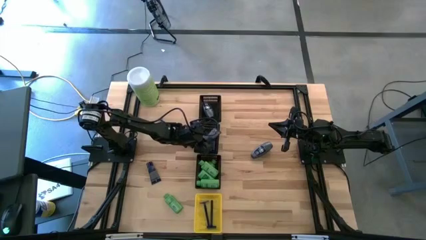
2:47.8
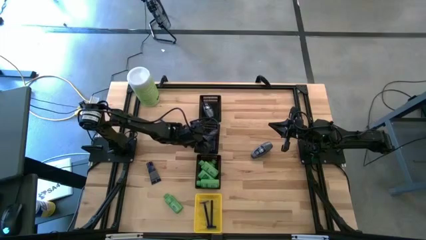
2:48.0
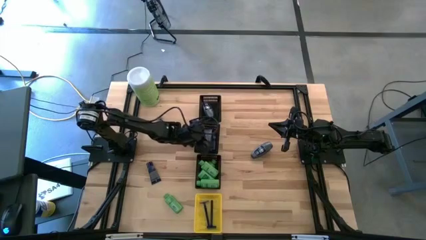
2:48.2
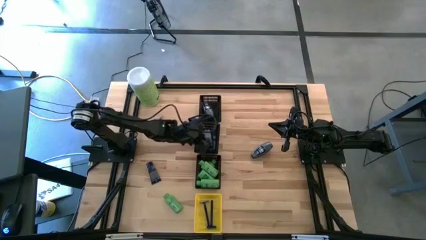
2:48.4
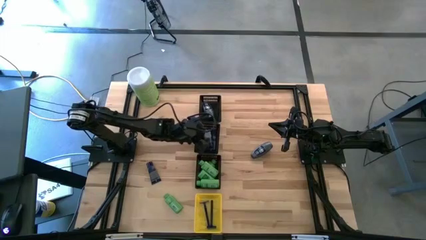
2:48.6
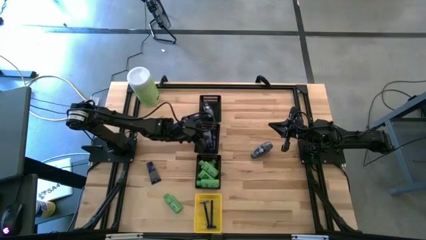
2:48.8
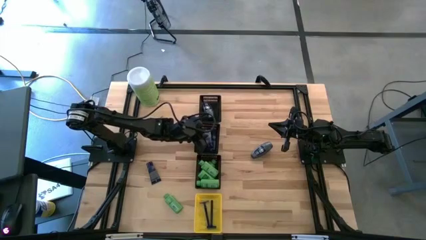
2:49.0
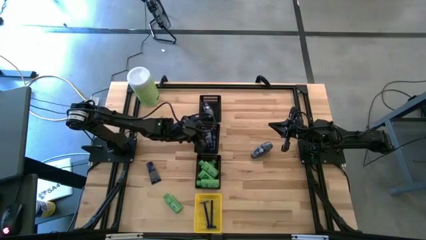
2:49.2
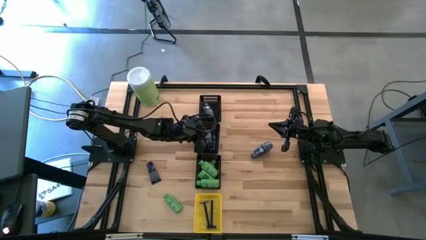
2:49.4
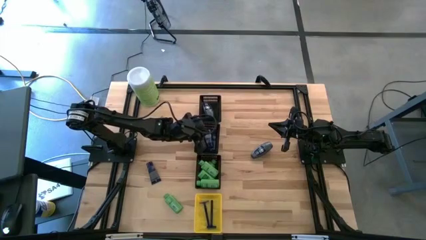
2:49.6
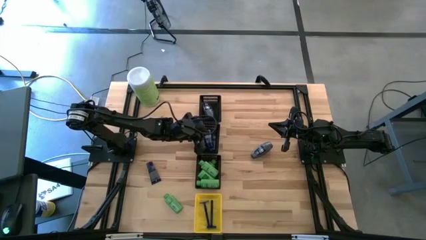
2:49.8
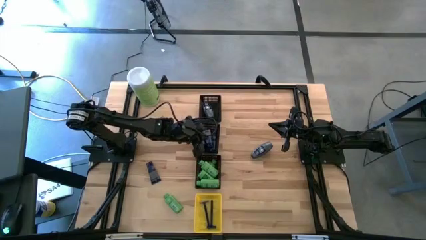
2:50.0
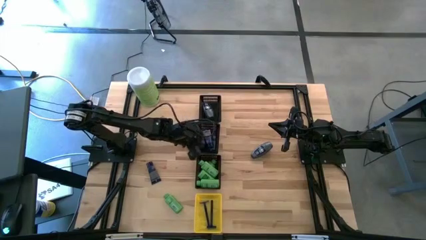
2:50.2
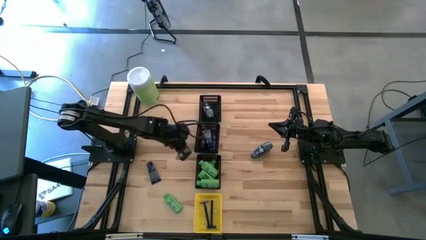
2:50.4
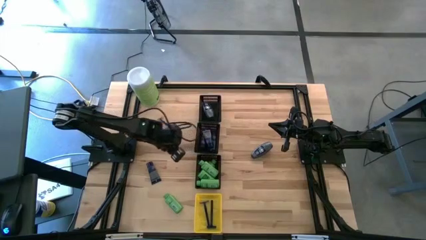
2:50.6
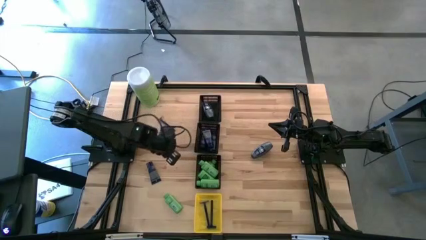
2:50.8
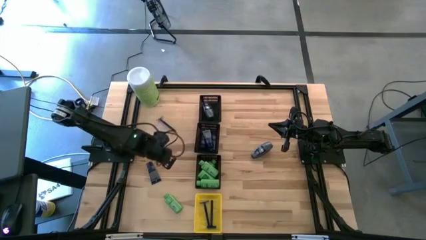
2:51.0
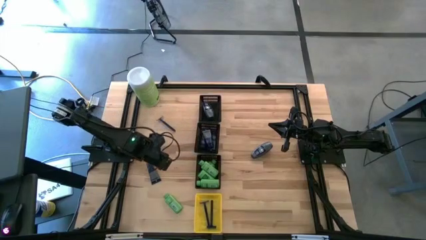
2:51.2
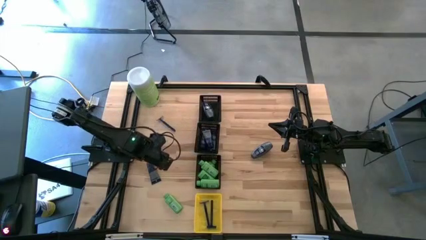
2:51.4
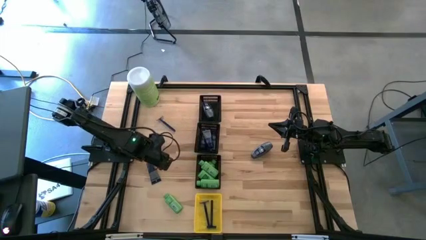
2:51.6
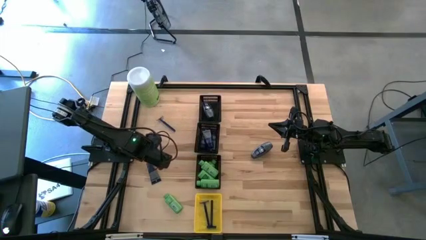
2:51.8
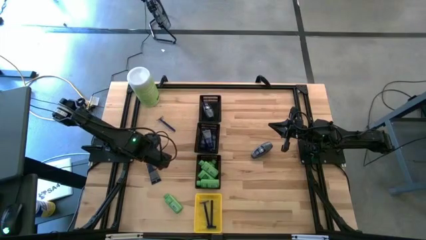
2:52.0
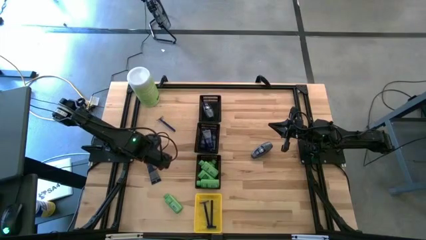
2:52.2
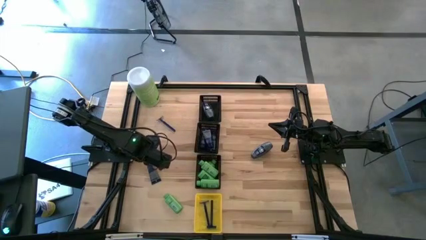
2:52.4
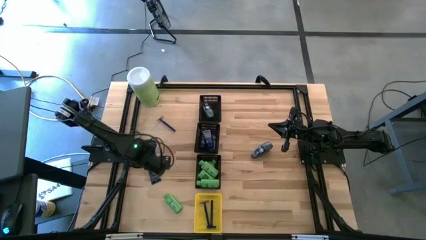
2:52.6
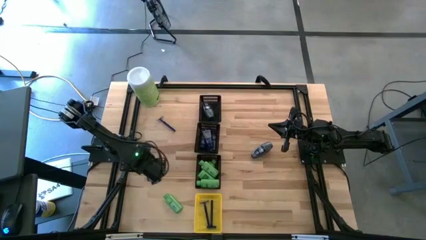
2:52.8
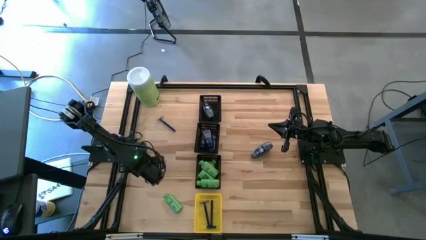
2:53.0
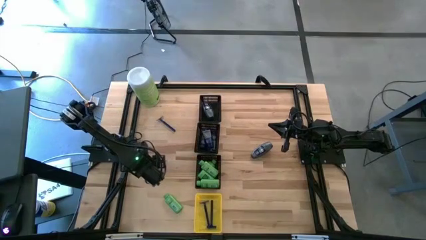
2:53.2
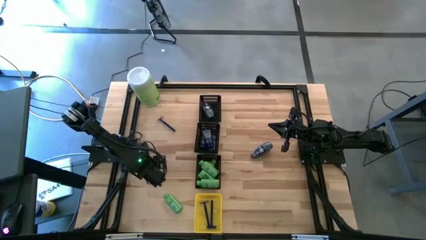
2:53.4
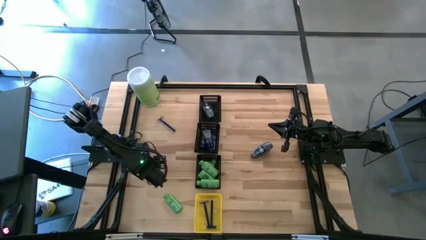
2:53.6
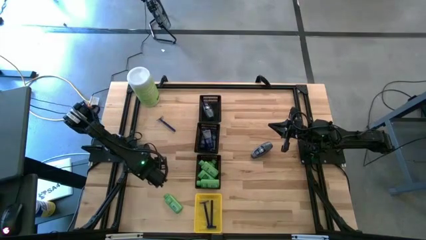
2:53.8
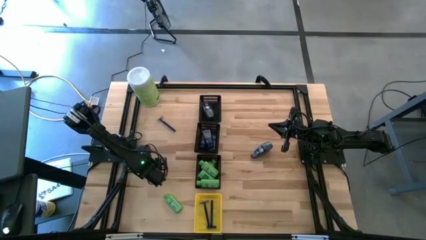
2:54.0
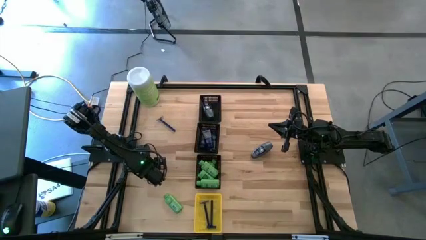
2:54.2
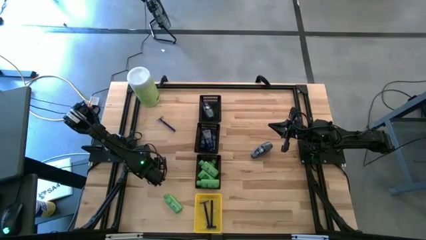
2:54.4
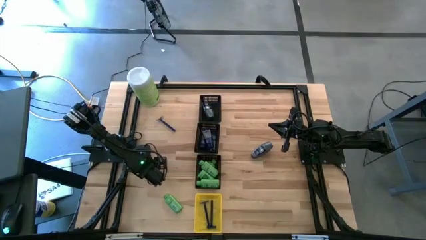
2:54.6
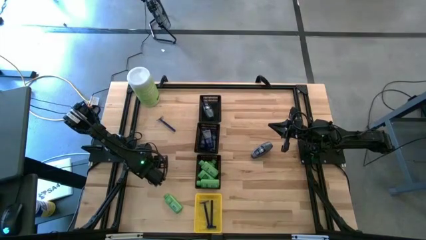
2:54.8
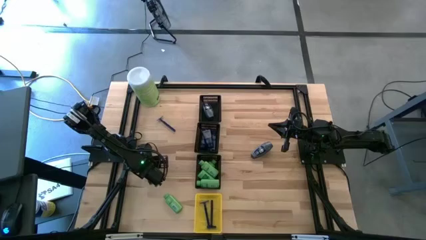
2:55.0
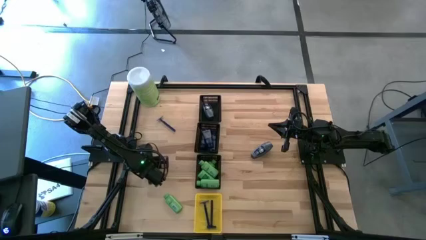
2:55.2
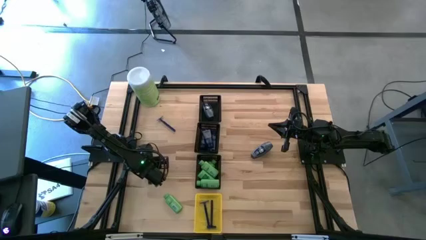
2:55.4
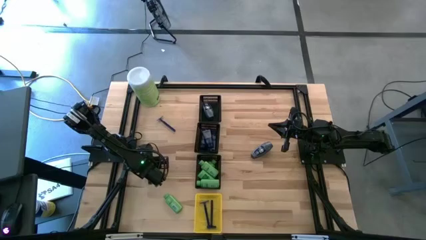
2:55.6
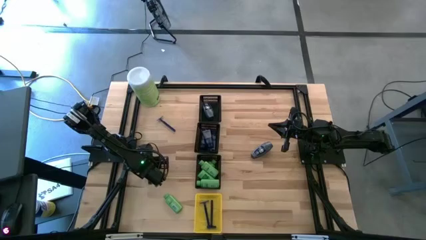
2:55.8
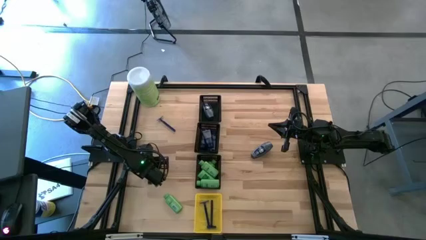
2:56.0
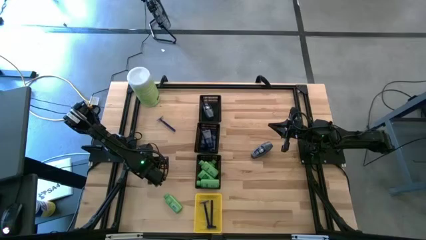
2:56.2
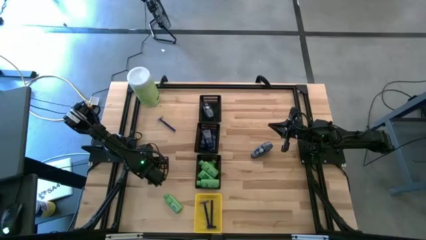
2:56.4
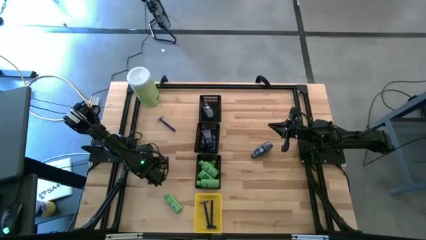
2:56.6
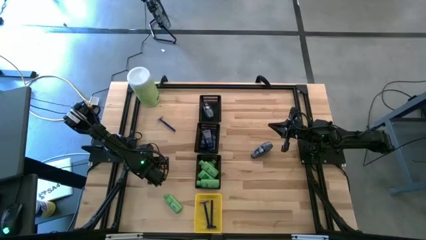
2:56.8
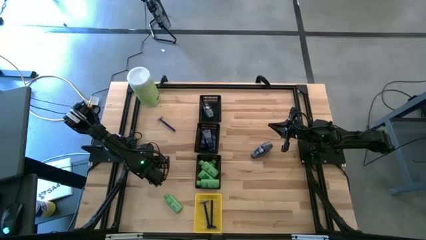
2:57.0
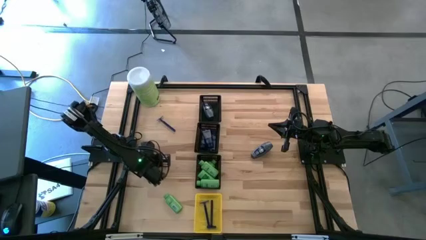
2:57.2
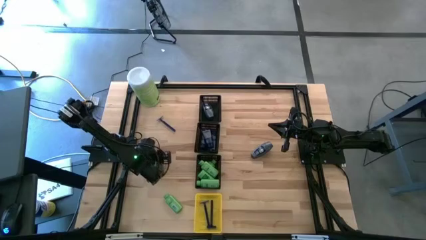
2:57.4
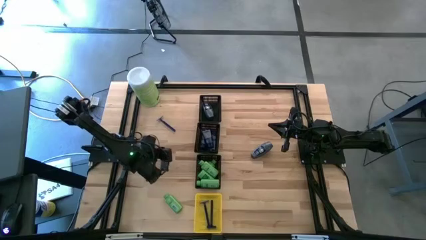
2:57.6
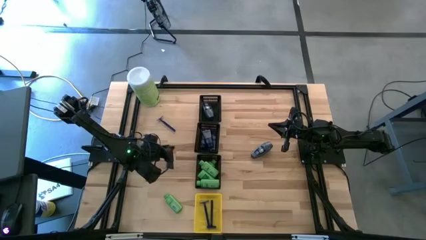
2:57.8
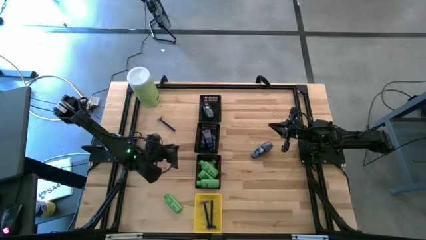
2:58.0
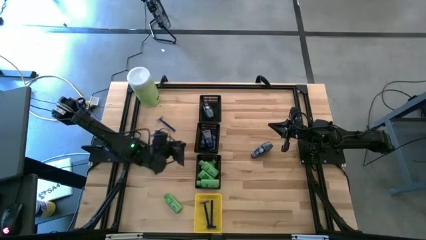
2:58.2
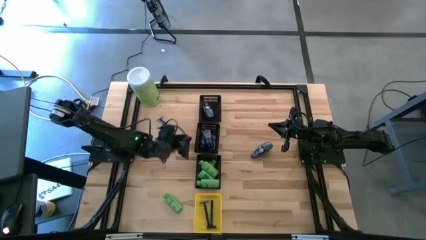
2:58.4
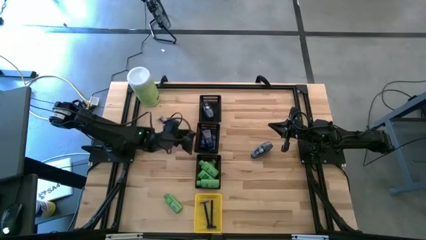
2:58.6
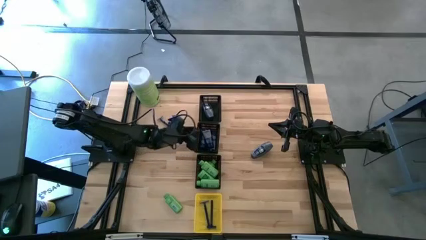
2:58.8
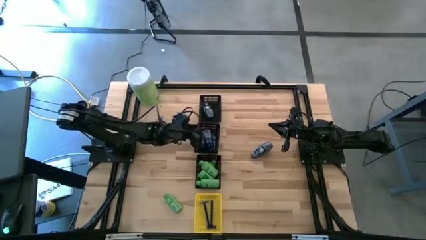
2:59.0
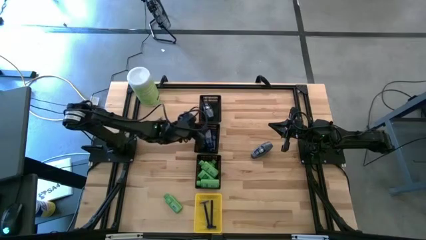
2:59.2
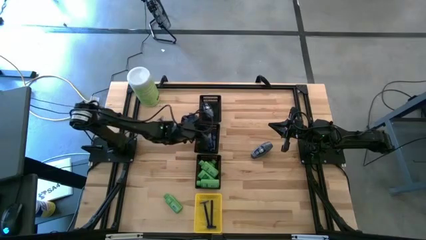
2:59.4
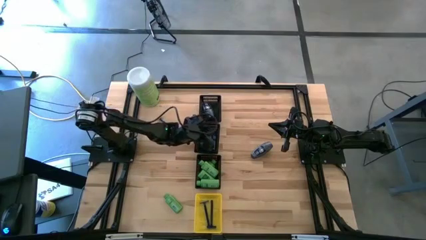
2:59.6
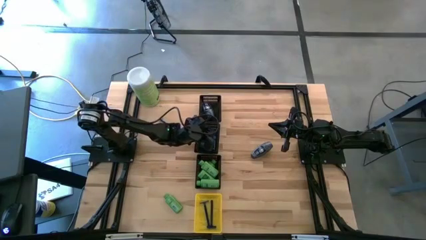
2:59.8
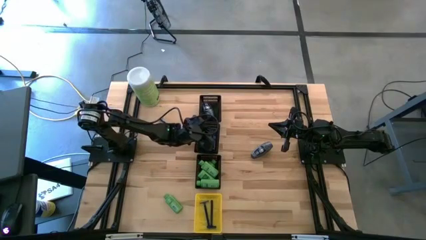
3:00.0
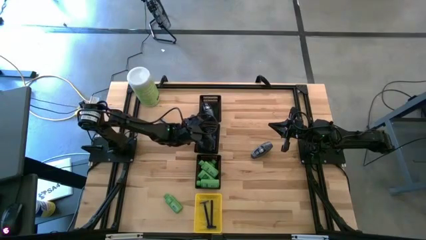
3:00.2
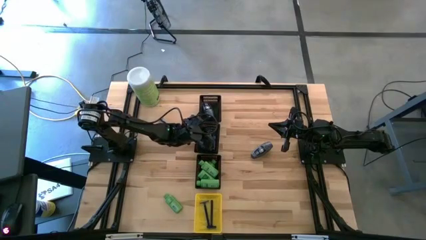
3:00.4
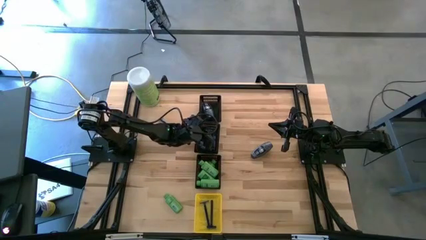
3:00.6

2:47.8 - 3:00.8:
Task: Pick & Place Travel size toiletries
Put the dark blue shave butter bottle into the center black bin

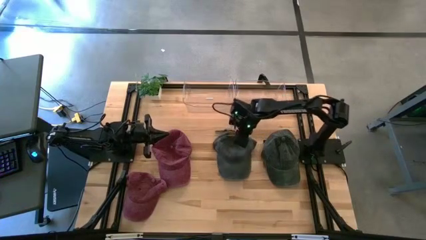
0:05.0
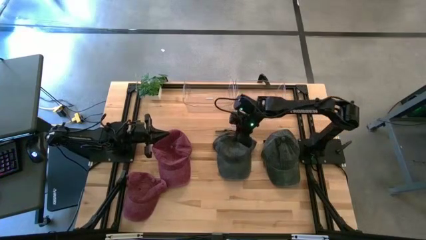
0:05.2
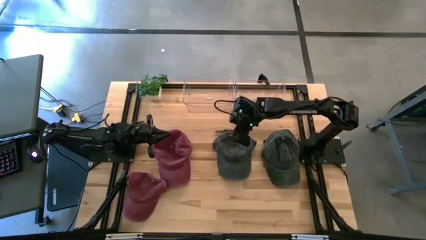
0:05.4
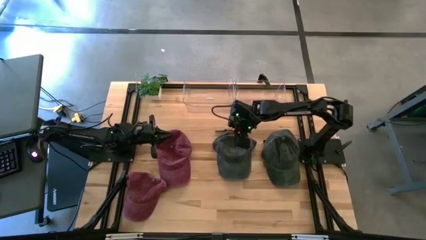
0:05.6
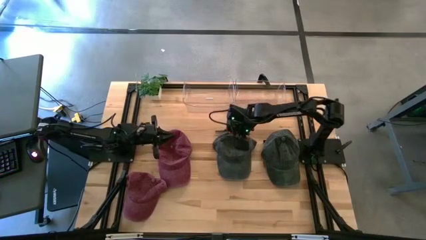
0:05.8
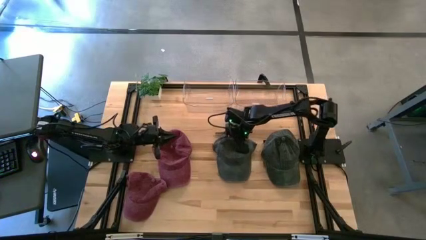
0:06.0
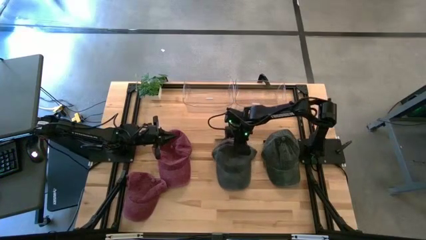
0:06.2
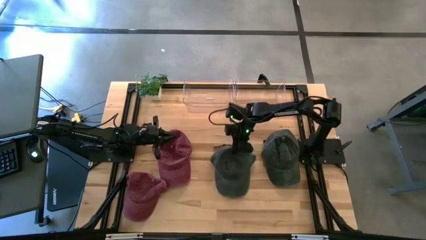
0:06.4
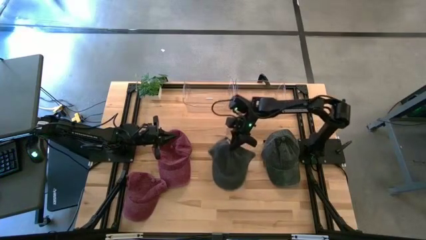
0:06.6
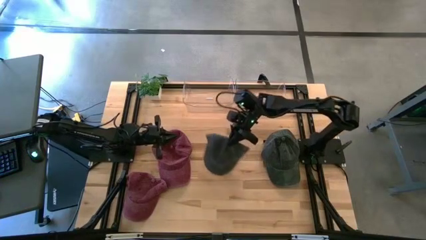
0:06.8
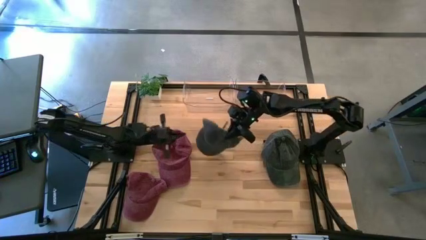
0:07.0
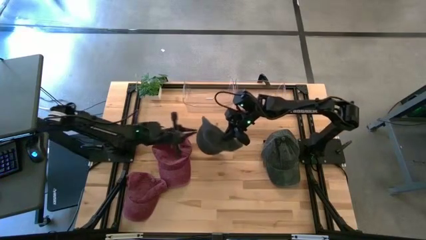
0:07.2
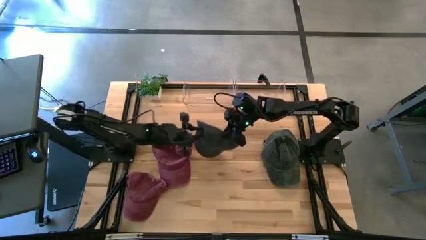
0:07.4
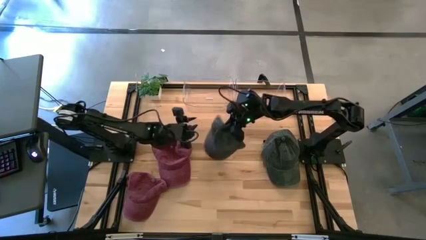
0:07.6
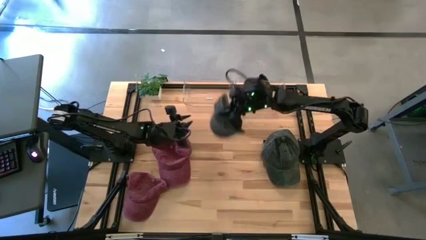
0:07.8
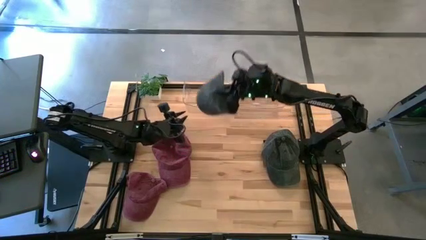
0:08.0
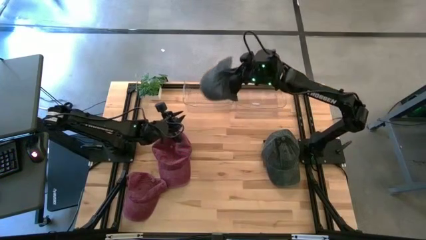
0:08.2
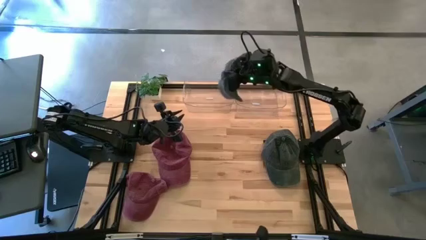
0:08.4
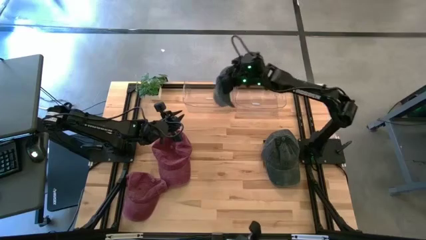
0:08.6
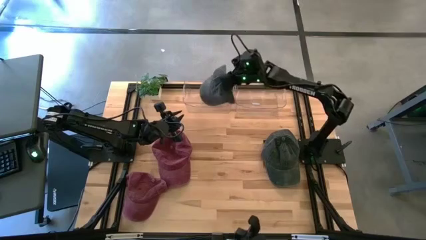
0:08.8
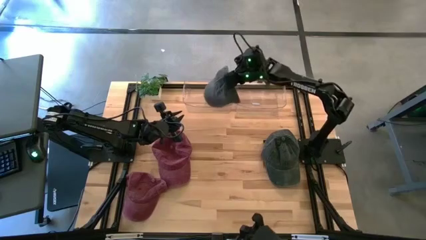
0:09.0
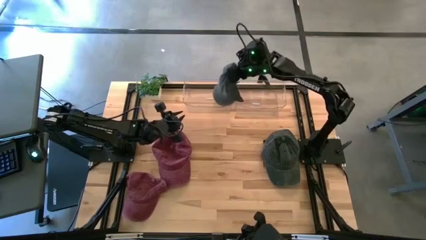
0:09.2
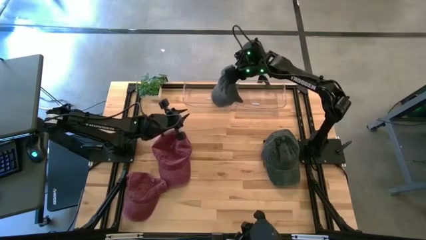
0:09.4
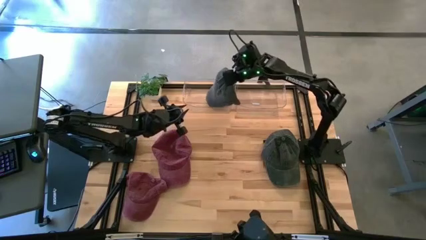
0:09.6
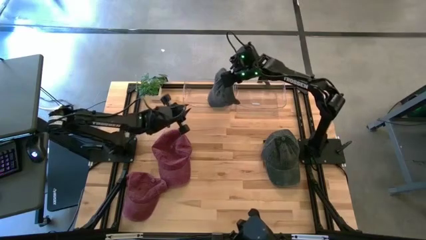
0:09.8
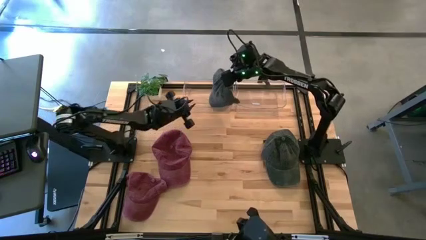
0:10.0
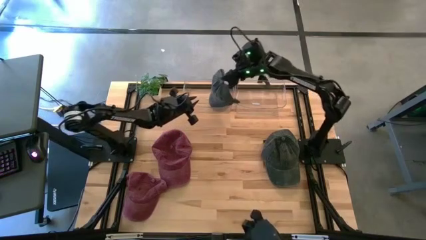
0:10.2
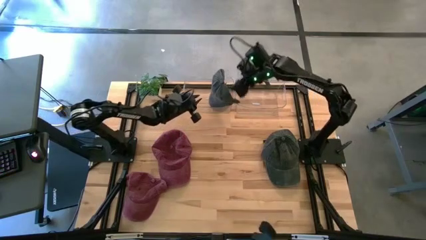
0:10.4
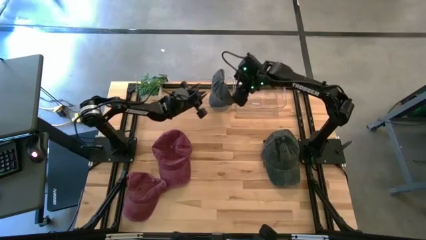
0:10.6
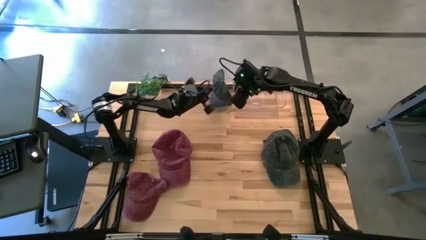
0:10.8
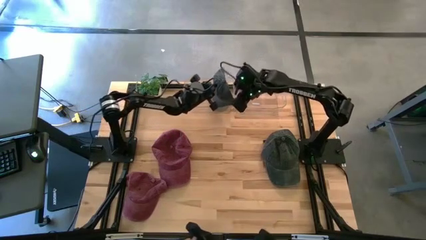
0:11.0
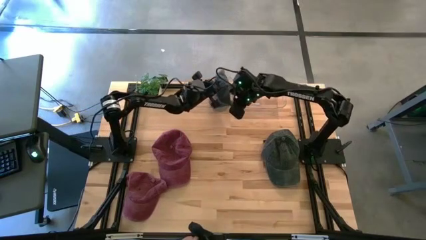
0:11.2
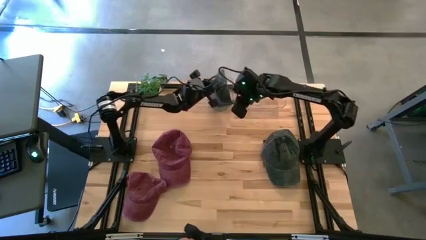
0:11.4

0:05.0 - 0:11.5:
Task: Pick & Place hat
Put the left black cap into the left transparent bin
